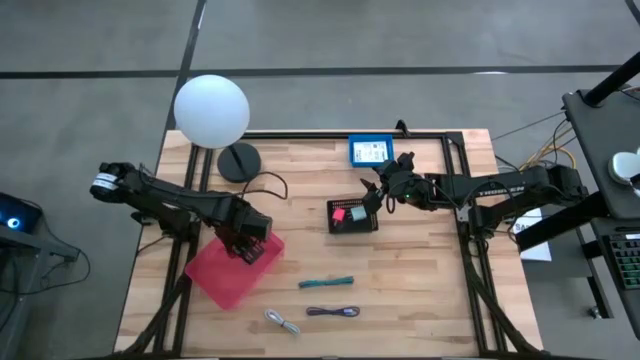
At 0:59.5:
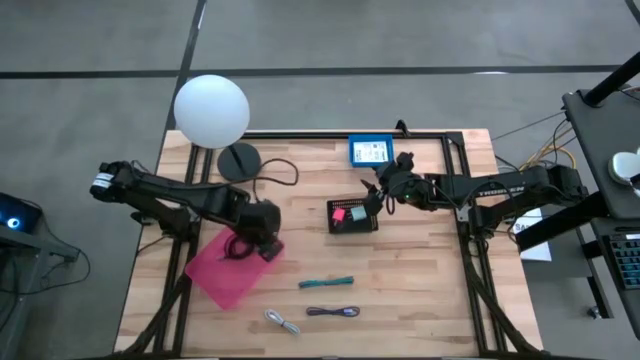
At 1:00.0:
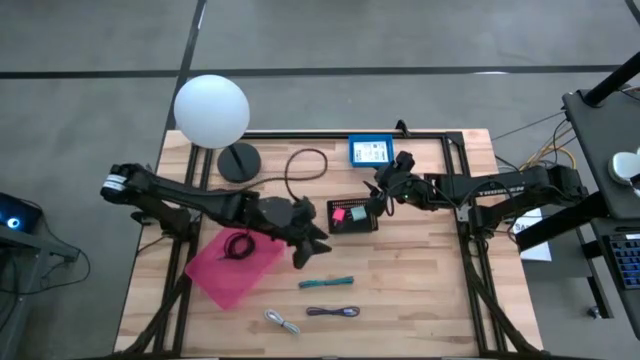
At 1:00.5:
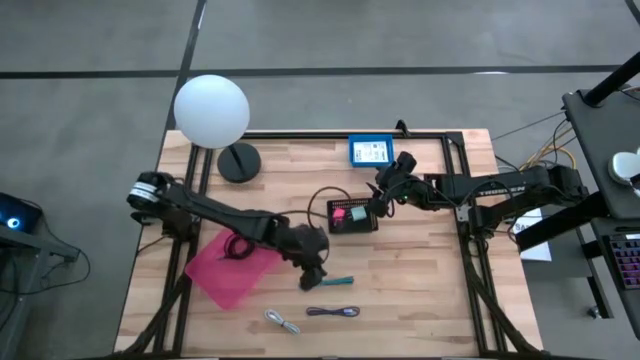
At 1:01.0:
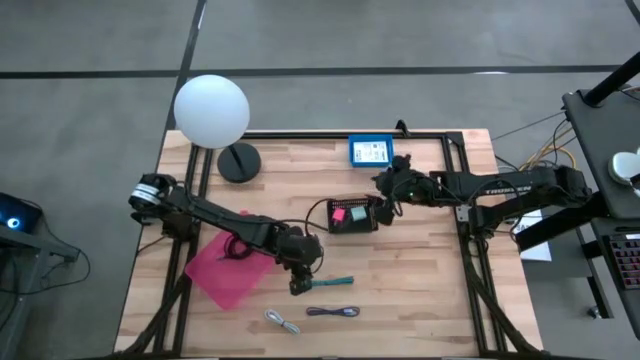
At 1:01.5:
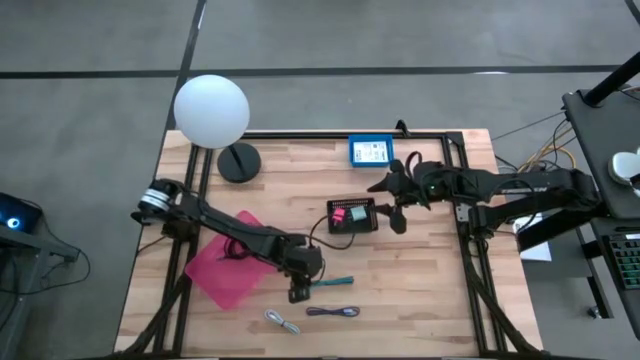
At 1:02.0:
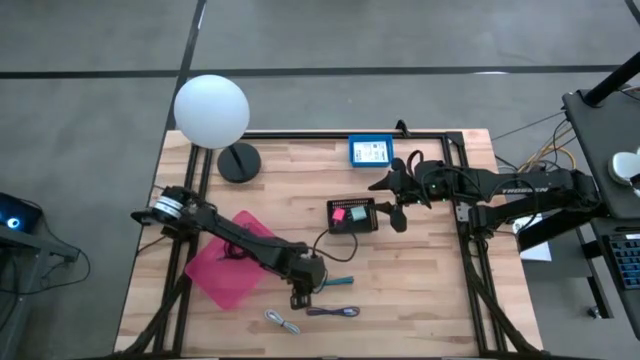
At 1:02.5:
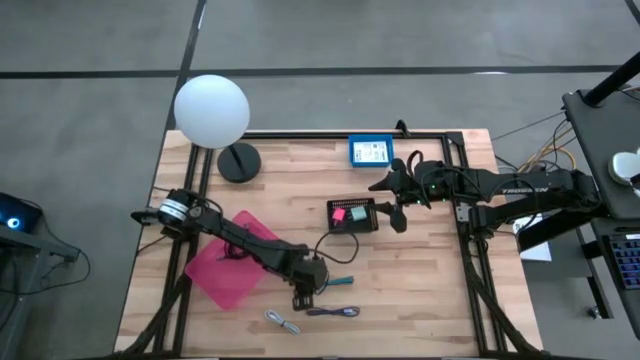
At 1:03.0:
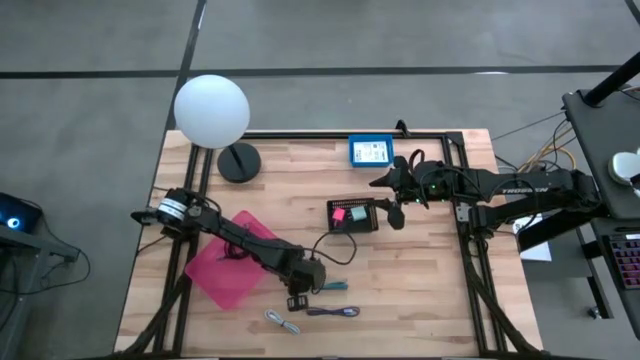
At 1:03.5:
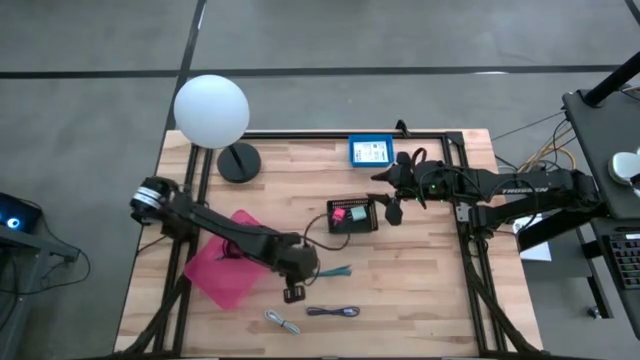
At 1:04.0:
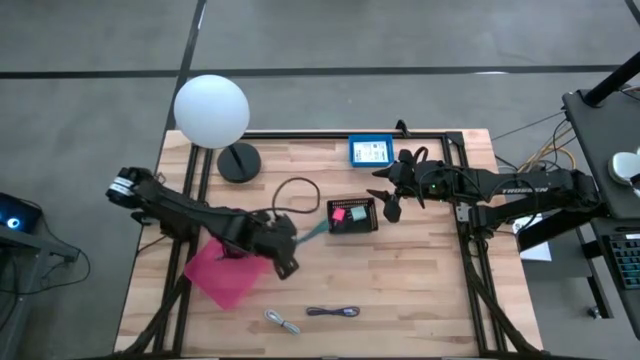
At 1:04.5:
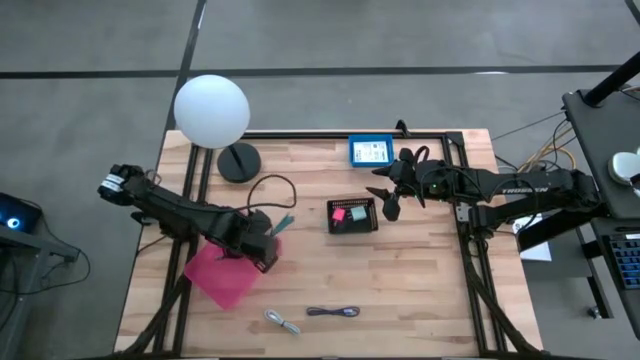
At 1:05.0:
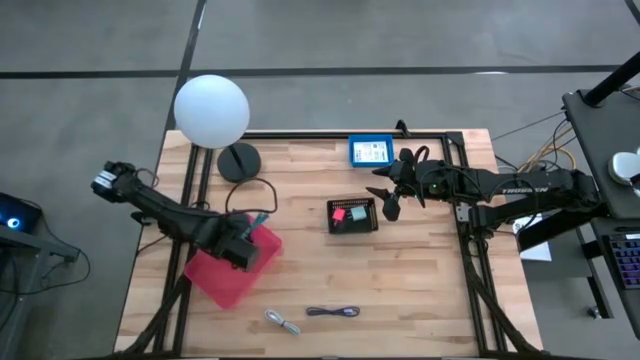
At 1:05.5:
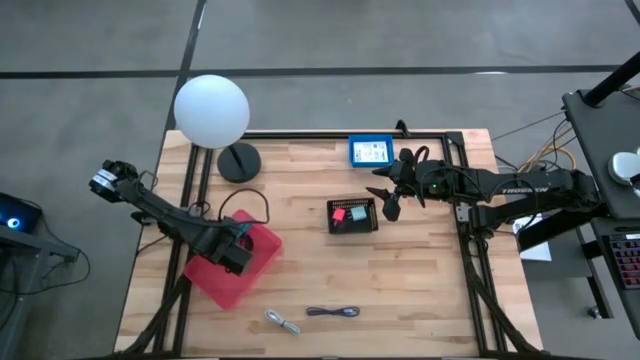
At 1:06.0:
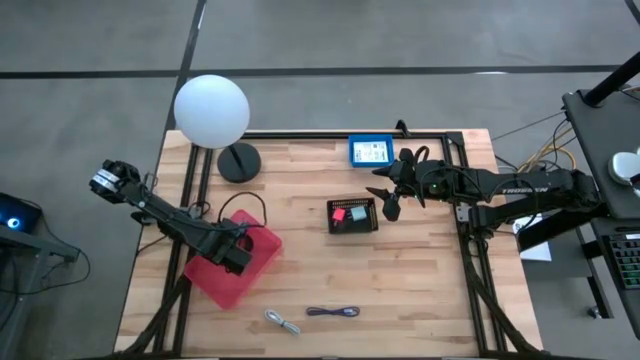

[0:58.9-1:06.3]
Task: Pick and place items into bin
Put the blue stripes charger cable into the pink bin

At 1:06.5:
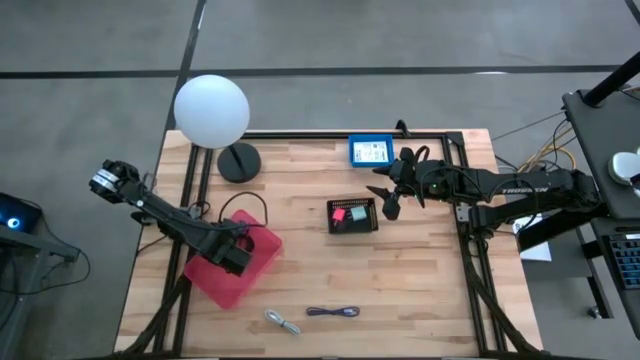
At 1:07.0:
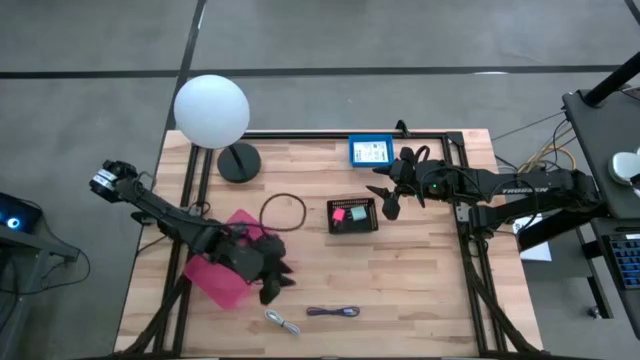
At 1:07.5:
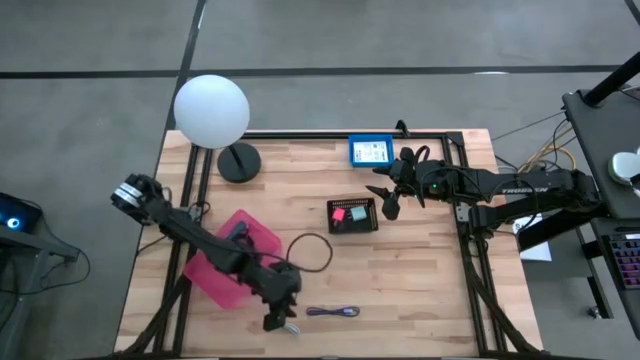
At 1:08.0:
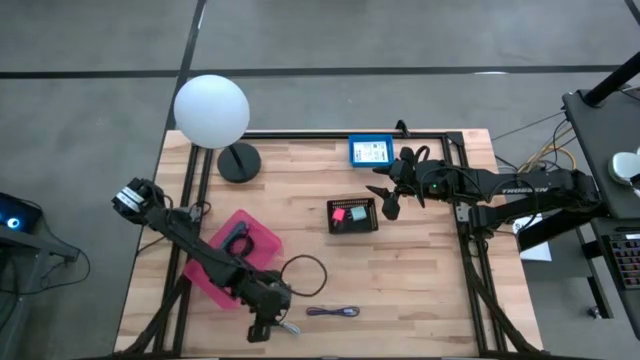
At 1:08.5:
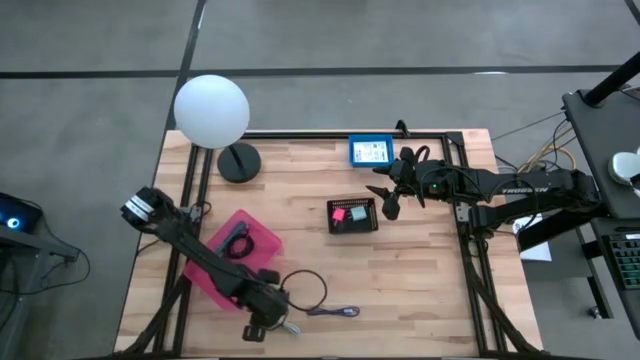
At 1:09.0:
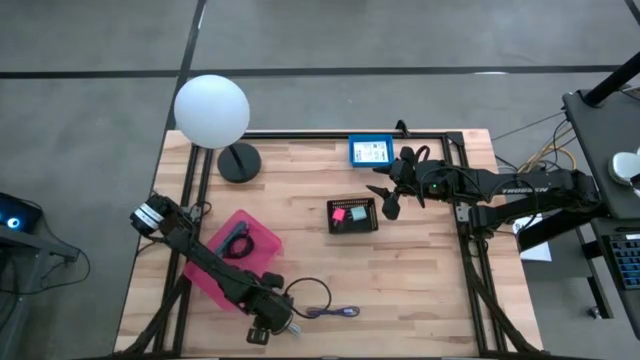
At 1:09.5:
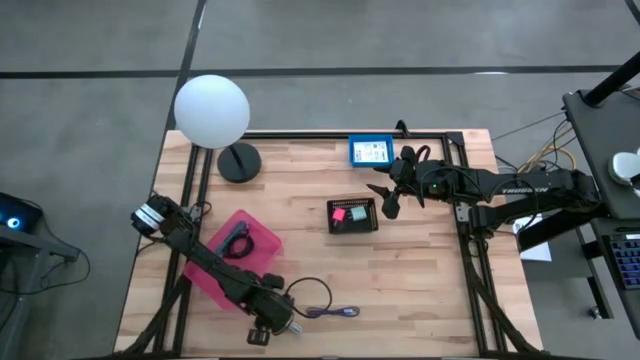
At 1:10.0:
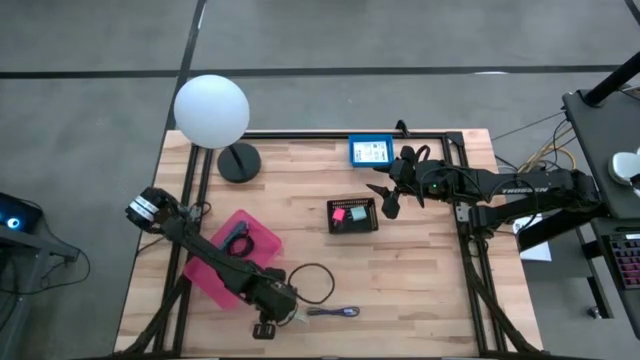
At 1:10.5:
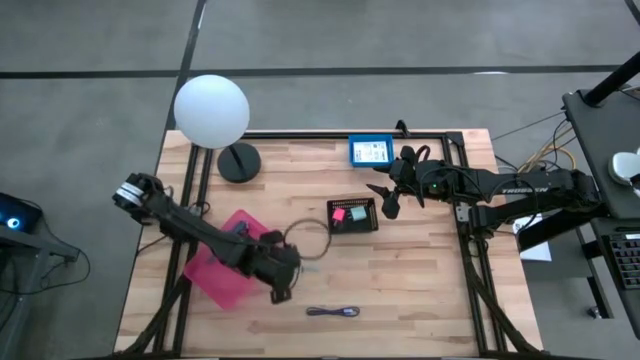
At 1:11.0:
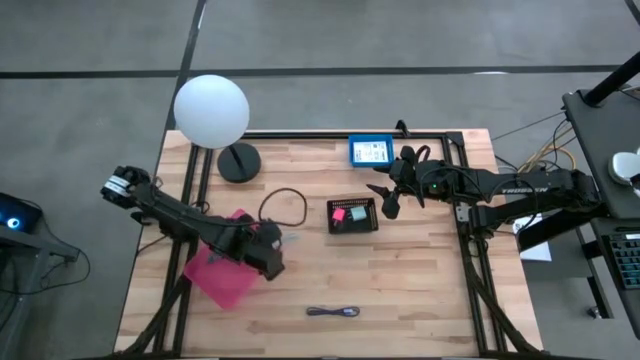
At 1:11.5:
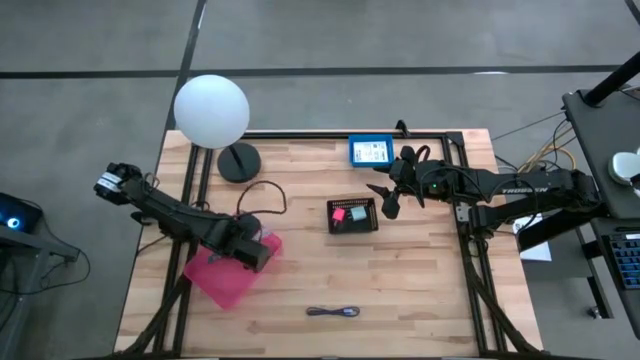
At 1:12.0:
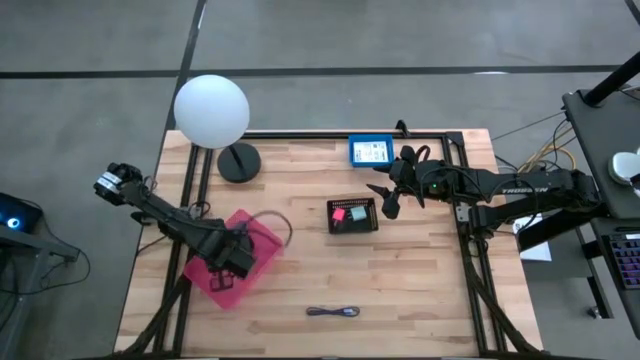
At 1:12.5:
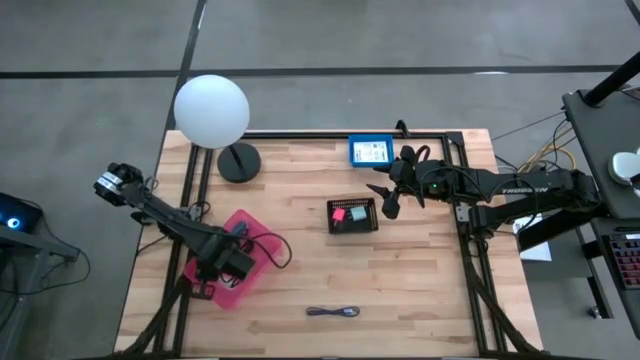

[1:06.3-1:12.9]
Put the white charger cable into the pink bin

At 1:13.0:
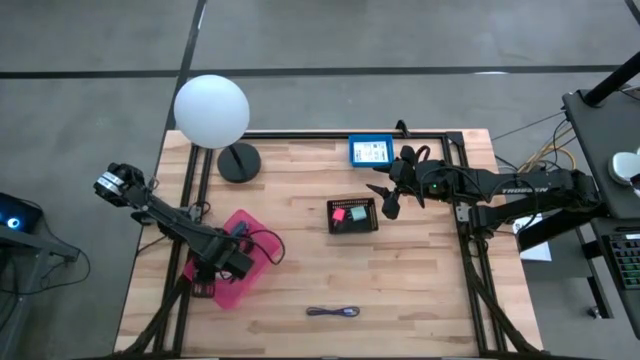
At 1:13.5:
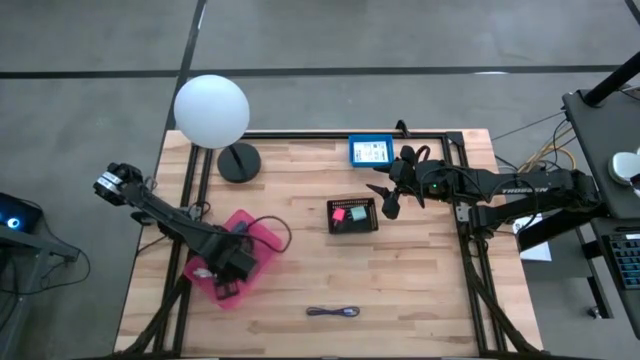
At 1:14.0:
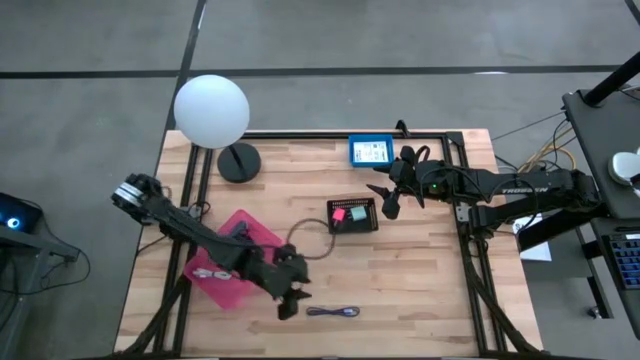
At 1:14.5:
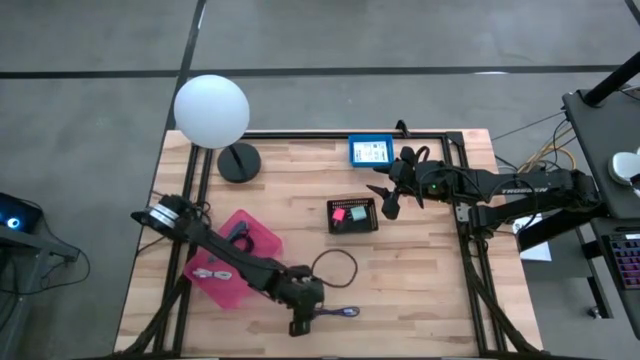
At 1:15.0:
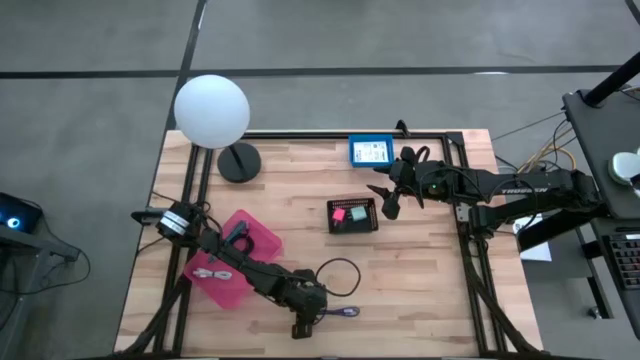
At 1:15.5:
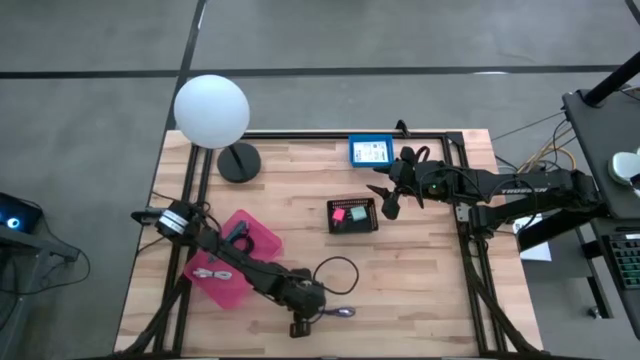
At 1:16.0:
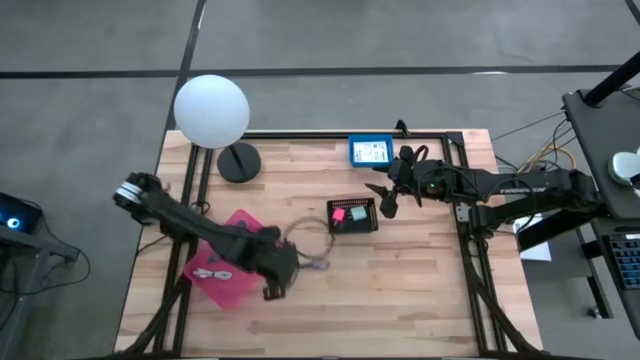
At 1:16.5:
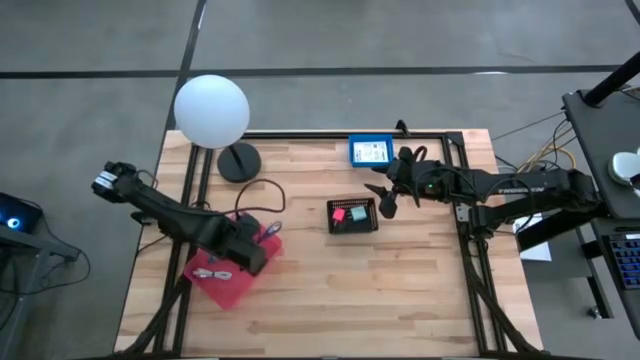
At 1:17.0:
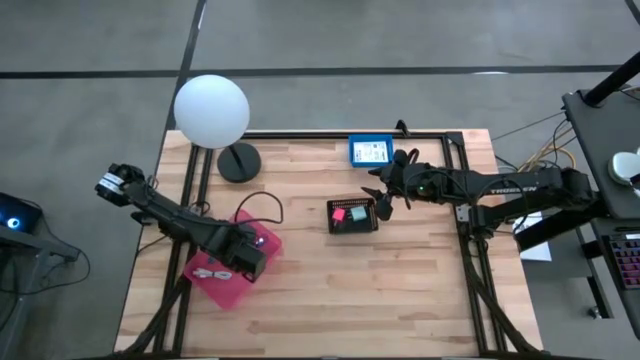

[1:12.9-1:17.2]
Put the violet charger cable into the pink bin

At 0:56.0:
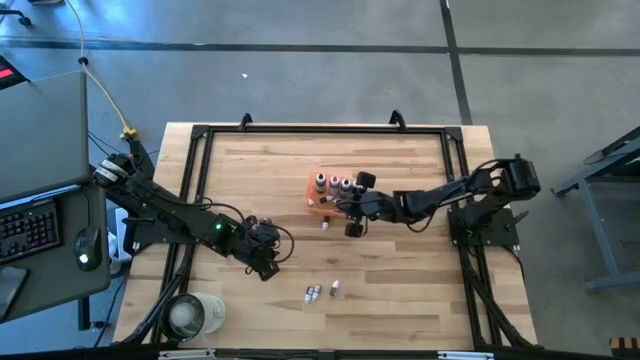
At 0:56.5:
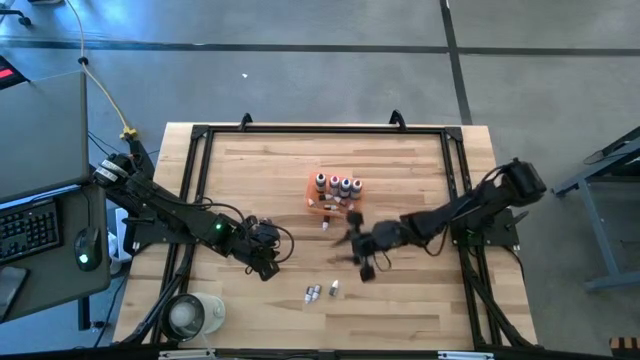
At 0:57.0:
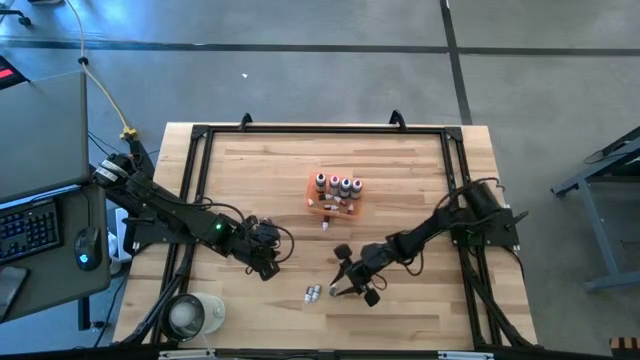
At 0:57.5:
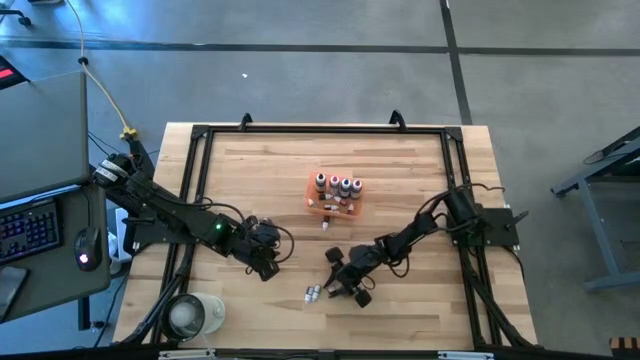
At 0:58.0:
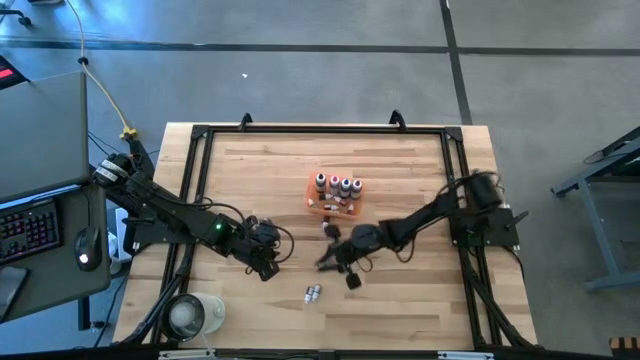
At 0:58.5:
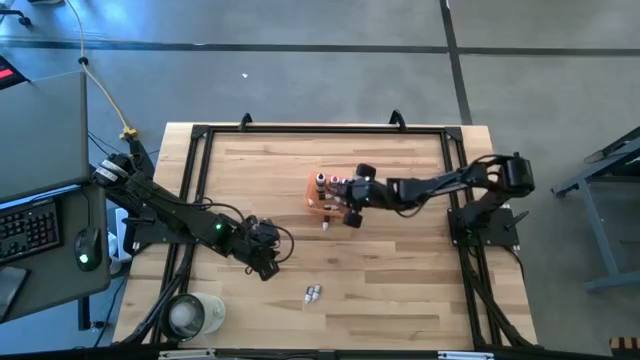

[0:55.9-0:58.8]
Task: Pick & Place food coloring
Put the small dark green food coloring bottle into the orange bin
